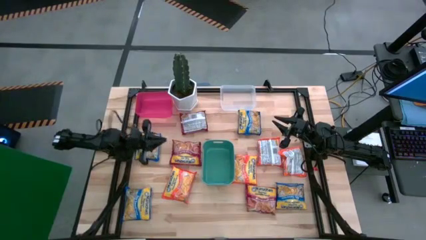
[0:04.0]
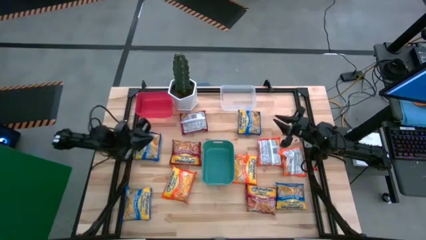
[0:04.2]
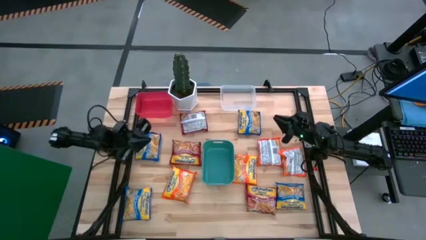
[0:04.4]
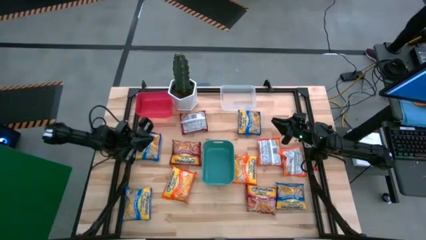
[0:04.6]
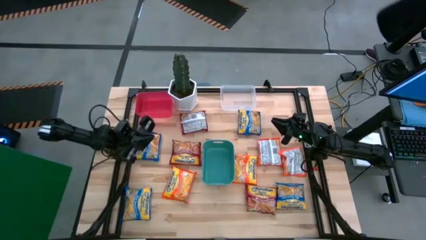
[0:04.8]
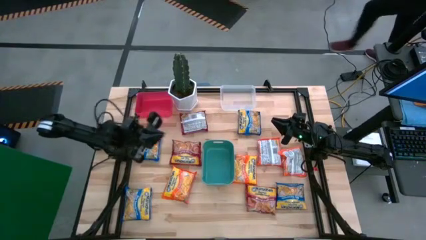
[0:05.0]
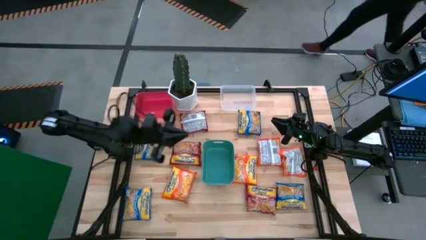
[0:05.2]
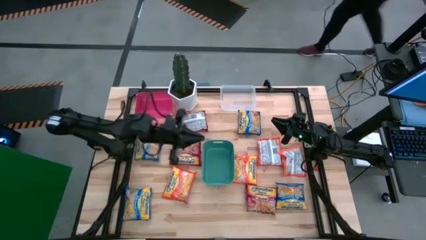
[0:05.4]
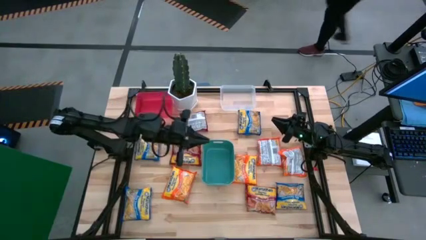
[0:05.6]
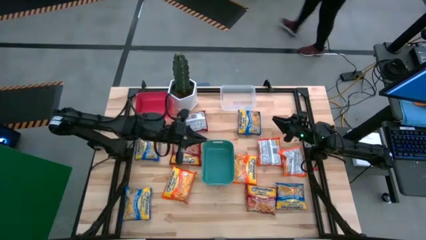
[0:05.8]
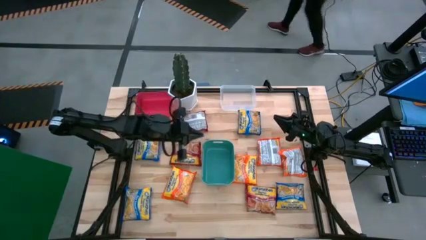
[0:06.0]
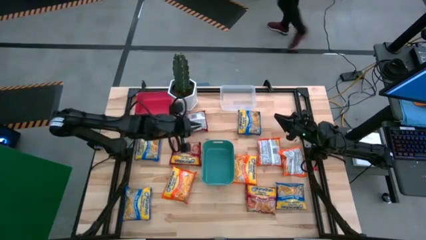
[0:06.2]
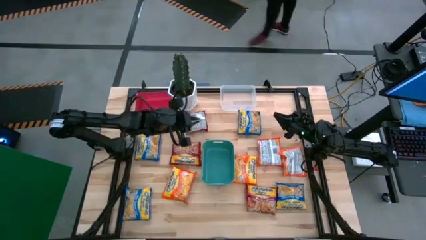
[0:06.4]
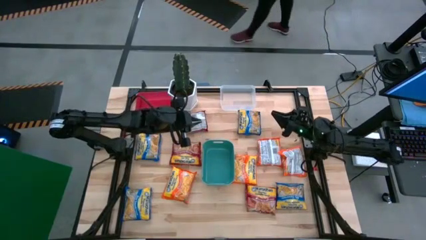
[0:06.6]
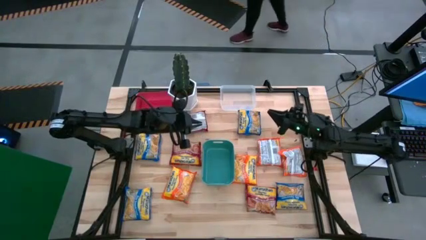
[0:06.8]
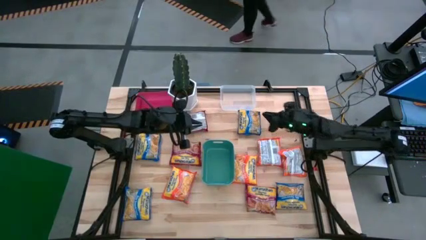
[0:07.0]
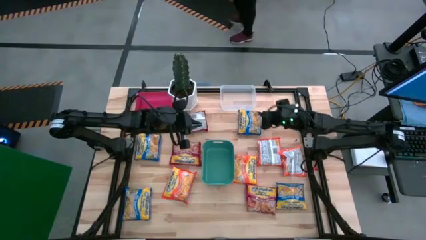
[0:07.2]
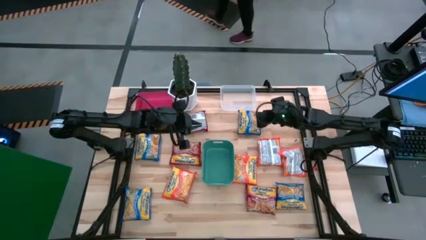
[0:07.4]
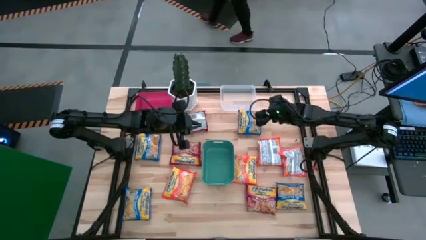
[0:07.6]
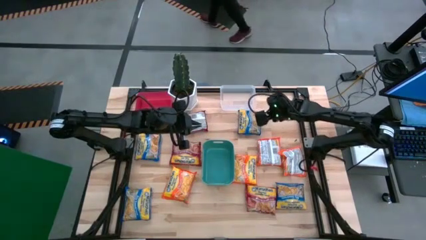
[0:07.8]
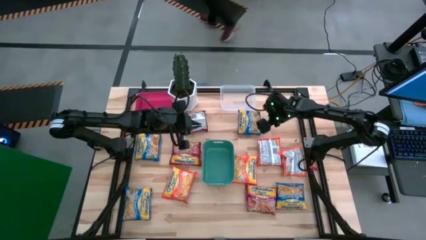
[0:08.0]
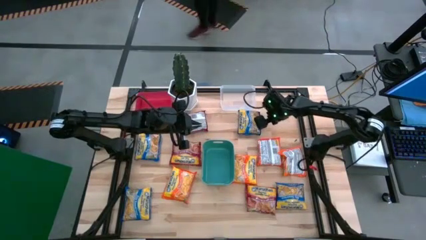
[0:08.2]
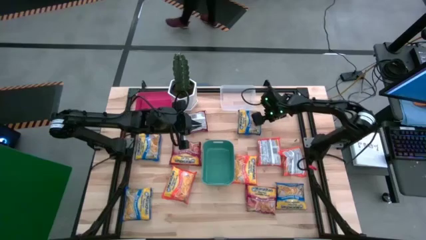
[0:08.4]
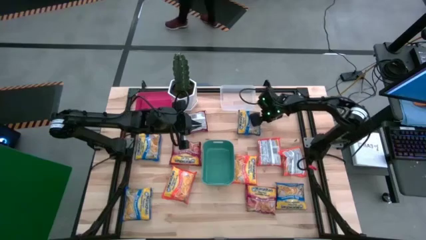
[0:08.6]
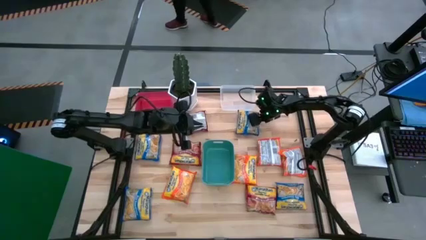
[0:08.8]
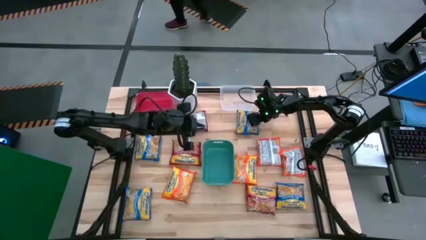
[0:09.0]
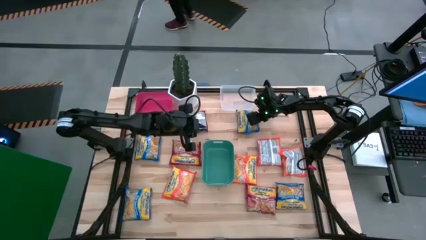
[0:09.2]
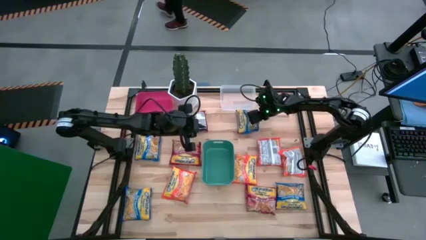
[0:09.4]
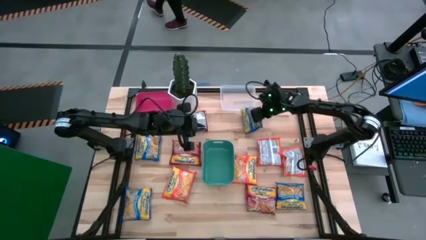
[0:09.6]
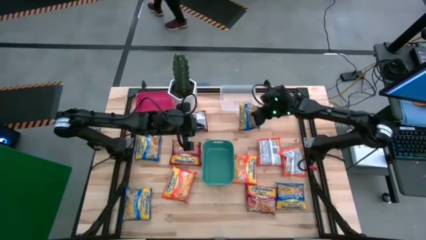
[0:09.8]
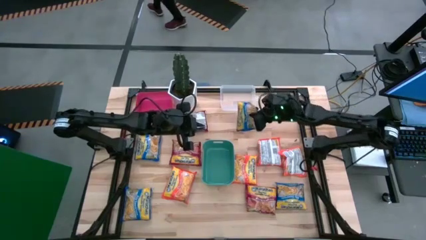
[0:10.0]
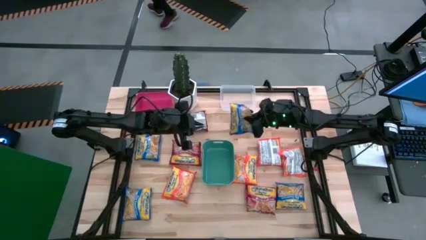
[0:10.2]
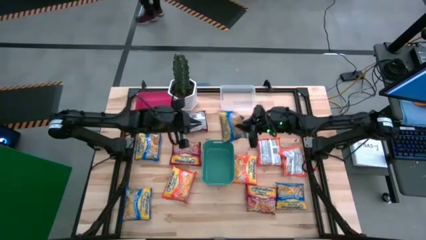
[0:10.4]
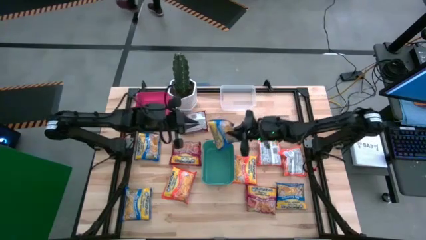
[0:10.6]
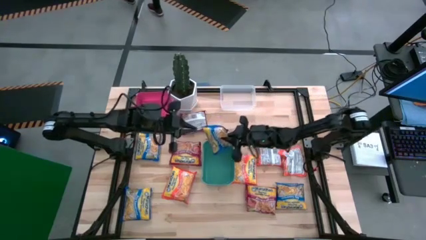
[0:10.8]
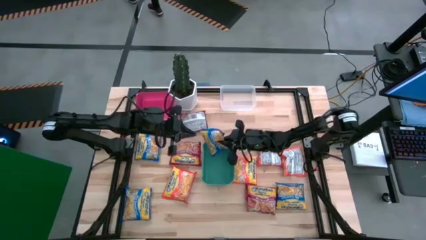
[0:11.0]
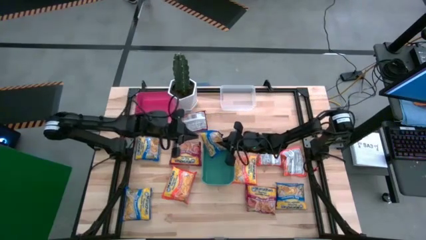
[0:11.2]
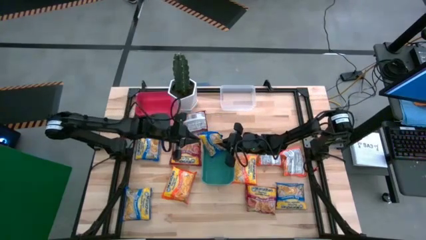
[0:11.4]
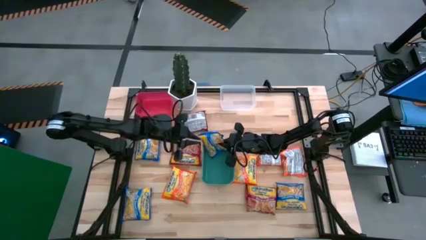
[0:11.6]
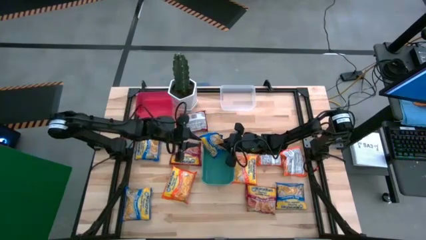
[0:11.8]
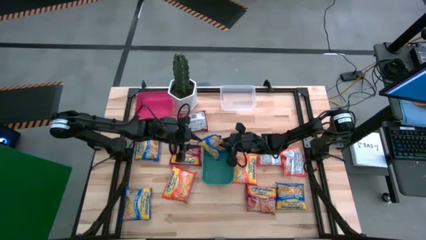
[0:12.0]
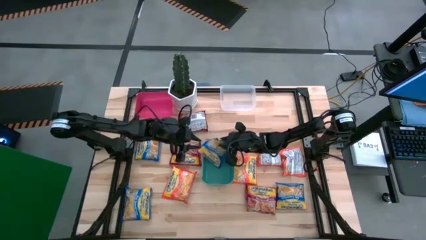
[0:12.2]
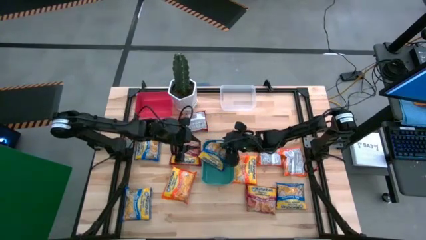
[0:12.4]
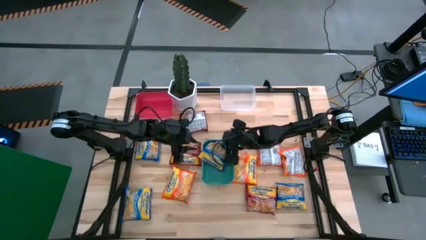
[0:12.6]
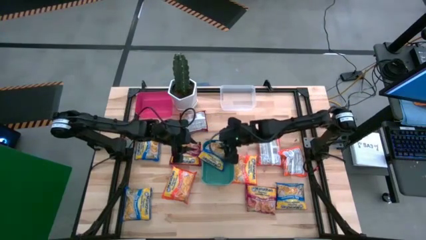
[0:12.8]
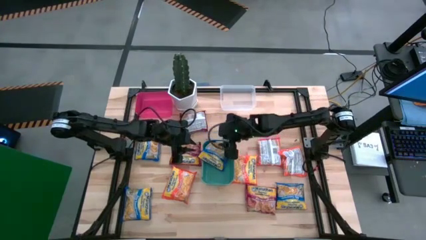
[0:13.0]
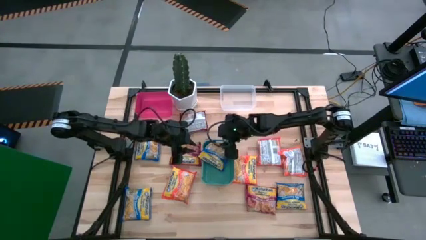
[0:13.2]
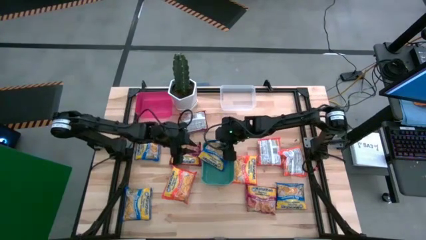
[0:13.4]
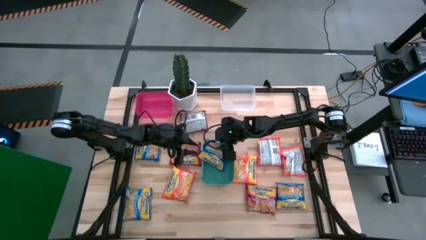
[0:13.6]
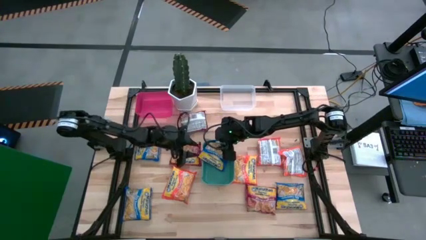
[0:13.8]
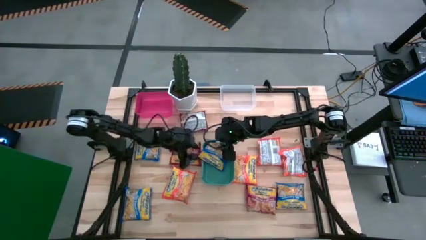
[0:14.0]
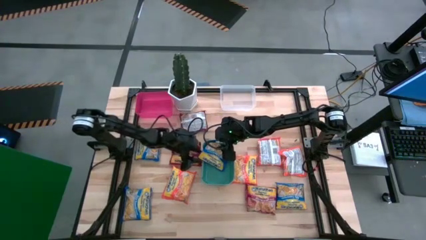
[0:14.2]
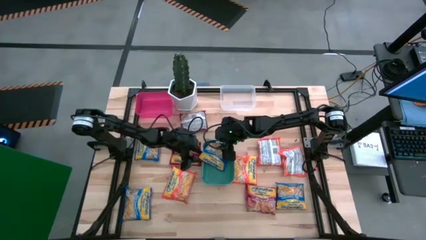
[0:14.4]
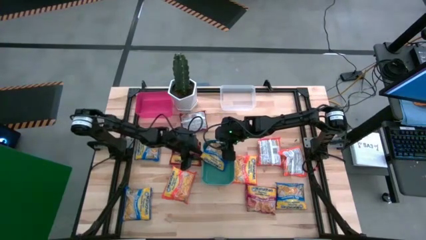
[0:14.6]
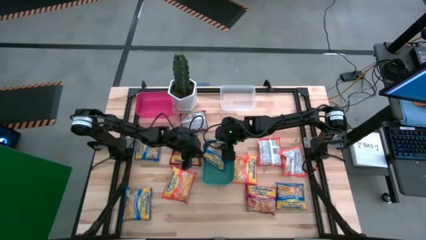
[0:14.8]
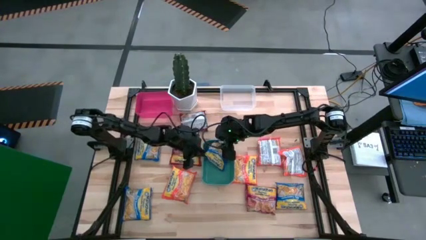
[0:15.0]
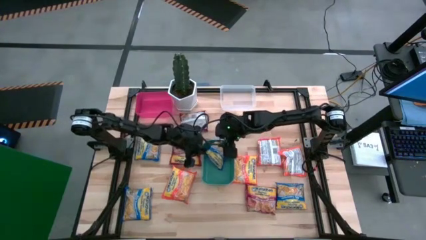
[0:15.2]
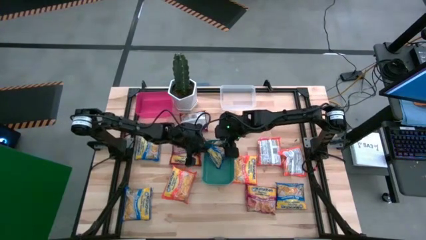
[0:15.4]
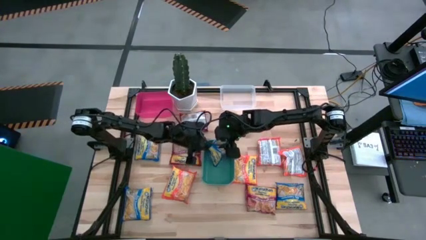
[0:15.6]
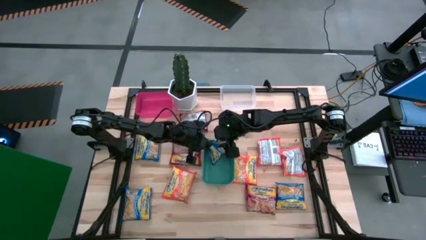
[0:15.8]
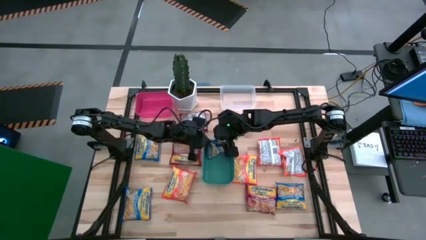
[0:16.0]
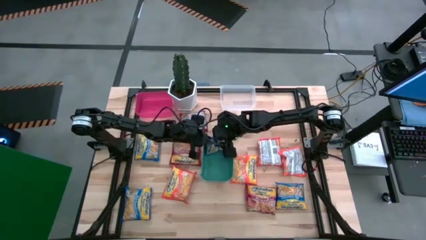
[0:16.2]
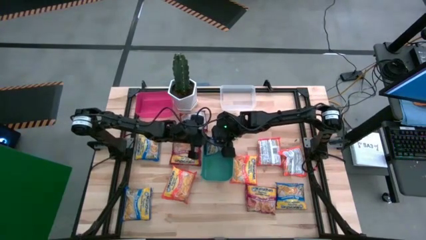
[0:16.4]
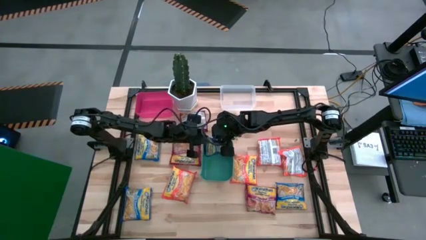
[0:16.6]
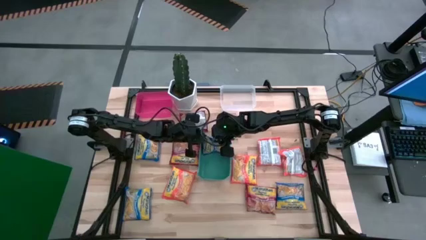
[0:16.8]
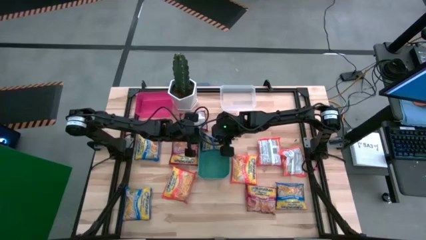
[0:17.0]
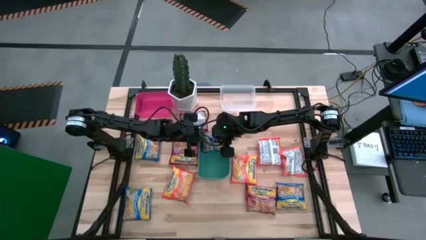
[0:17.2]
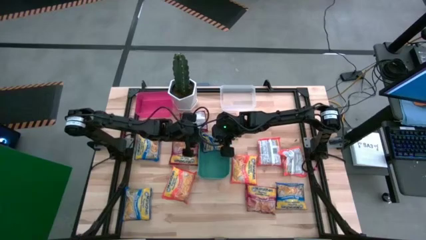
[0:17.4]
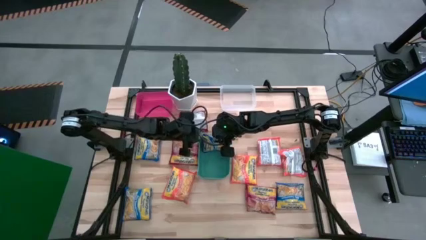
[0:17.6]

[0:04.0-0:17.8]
Task: Sort Maruchan noodles
Put the blue noodle pack into the green bin
